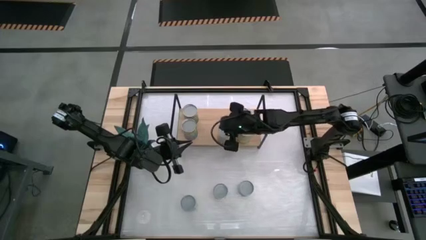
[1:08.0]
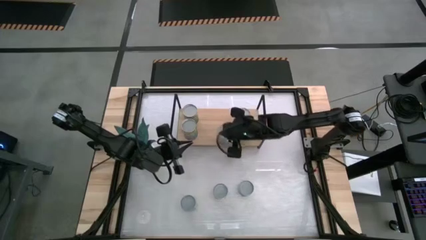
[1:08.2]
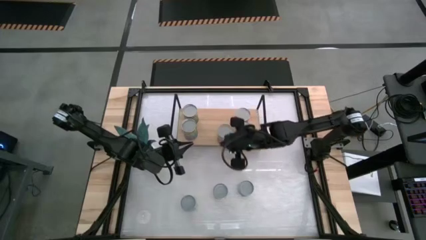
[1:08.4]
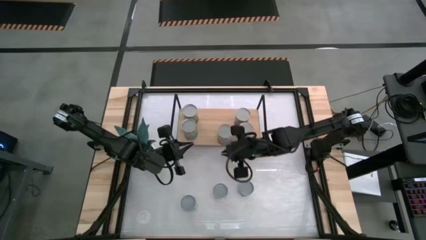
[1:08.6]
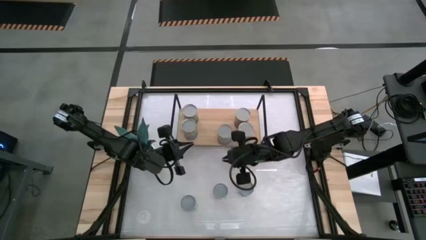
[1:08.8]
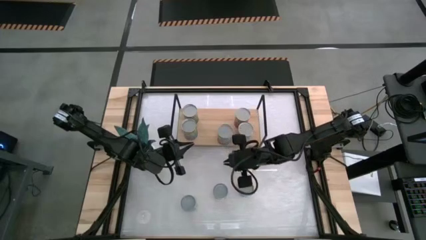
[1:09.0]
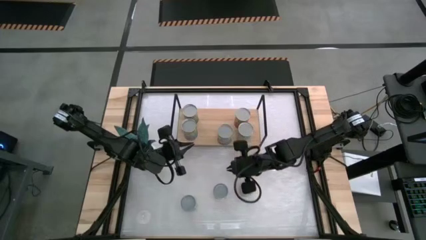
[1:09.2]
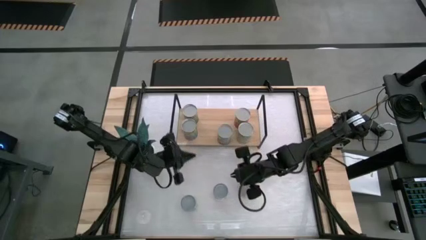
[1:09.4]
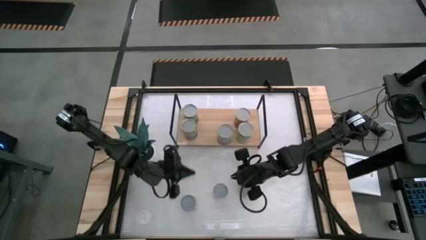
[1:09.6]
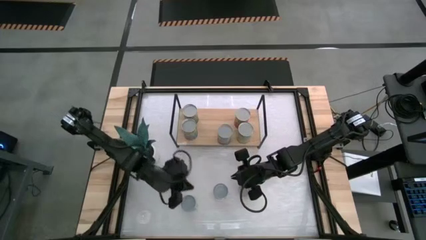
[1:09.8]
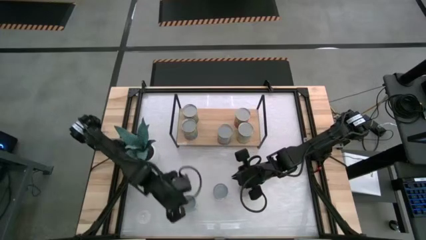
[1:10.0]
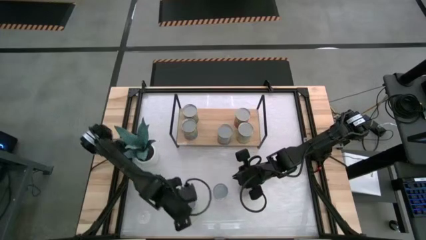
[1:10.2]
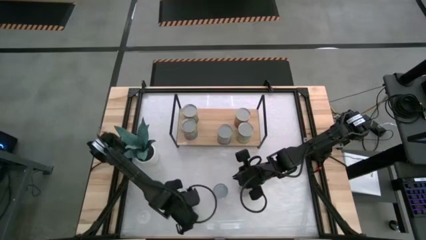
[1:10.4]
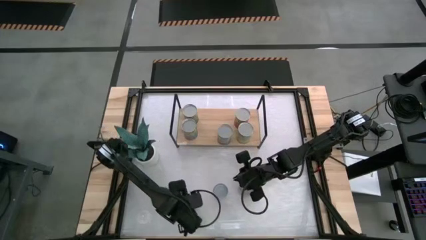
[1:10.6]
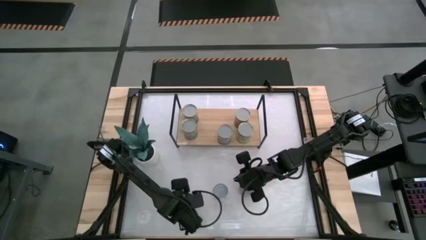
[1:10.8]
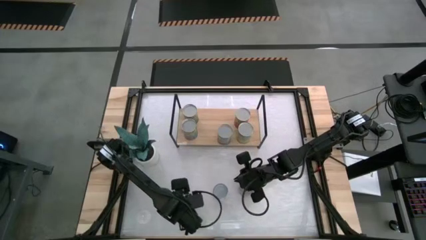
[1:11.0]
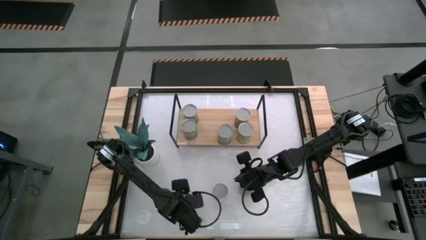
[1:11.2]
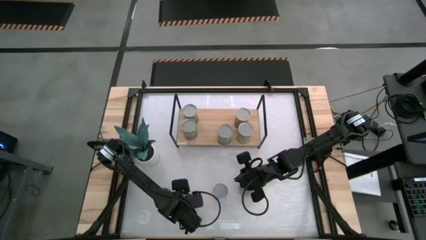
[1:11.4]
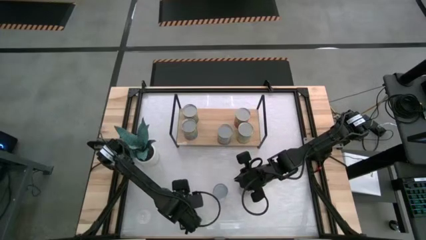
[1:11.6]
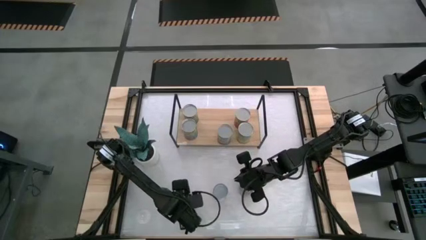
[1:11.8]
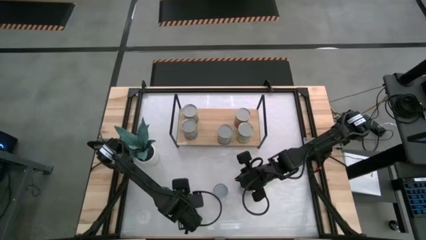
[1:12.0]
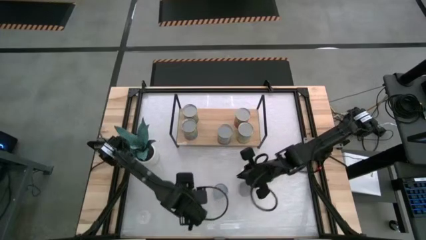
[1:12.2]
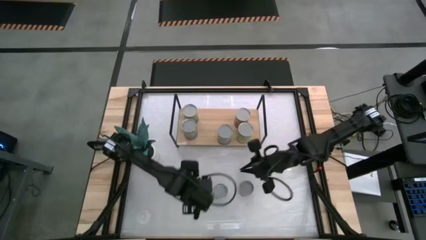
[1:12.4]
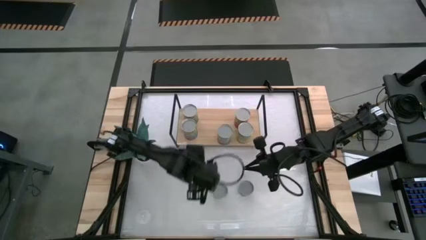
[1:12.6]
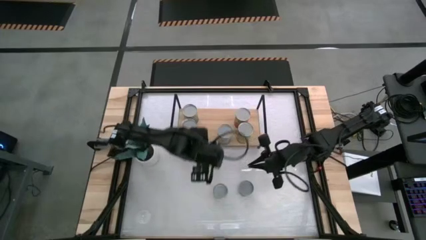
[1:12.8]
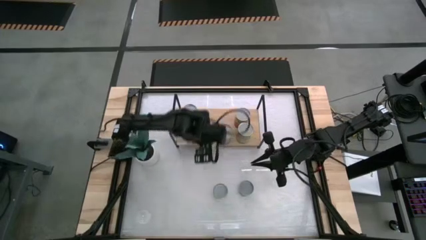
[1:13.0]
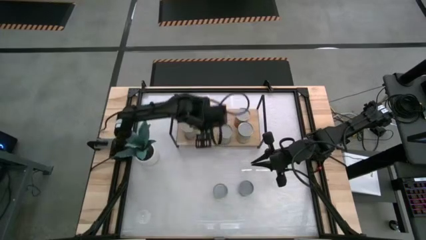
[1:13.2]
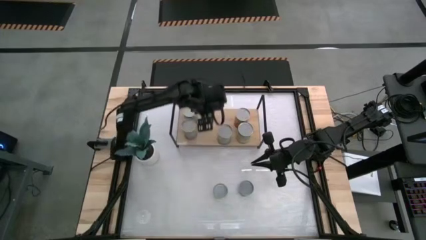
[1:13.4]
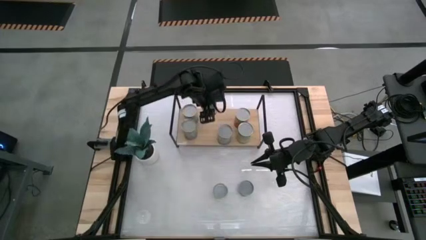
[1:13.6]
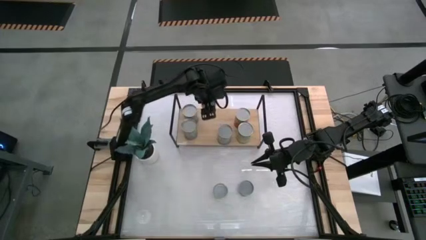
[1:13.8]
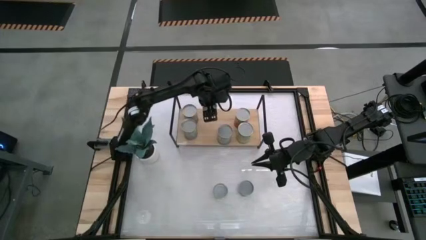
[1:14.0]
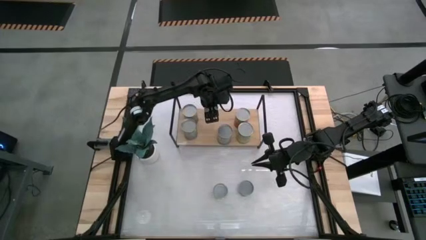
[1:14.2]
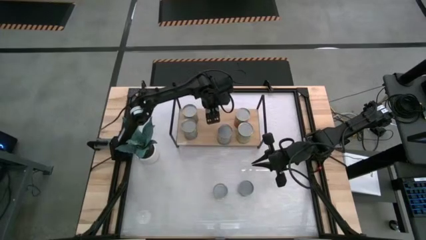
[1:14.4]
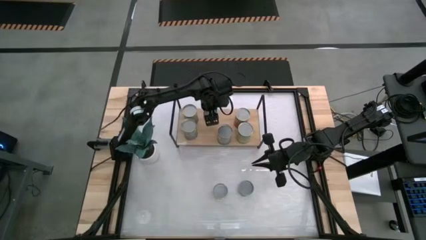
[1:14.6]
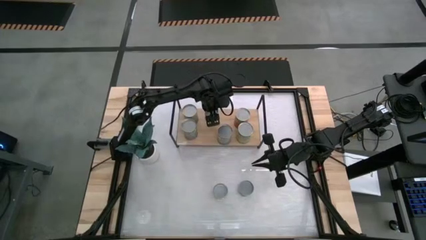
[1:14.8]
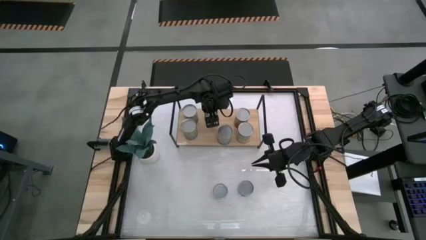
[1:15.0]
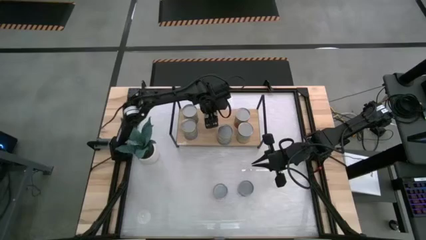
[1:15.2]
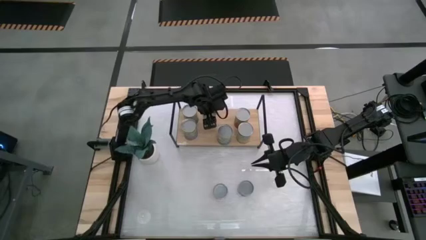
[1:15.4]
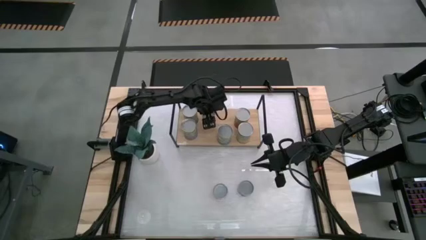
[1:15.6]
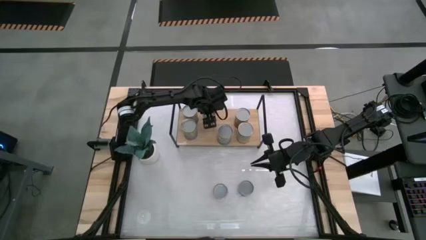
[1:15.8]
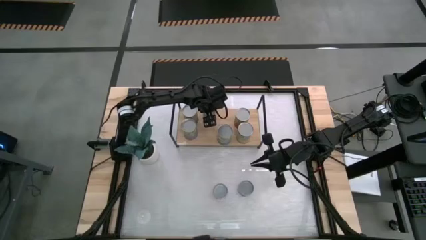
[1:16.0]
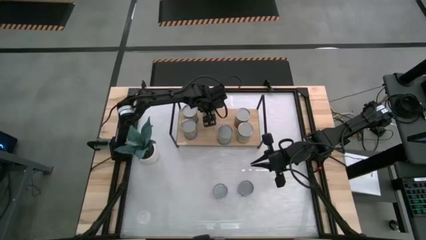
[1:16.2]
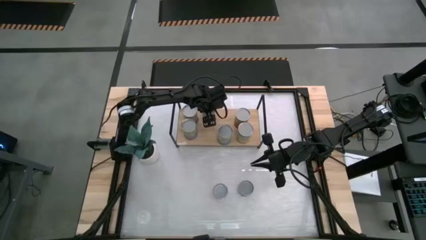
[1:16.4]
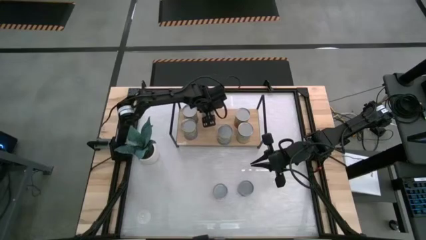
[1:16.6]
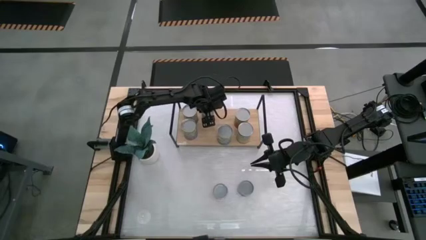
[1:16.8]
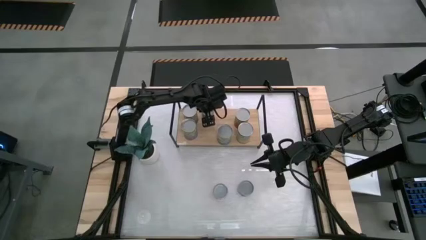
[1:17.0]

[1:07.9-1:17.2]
Task: Pick and place cans onto a shelf
Put the small canned slice peaches on the shelf

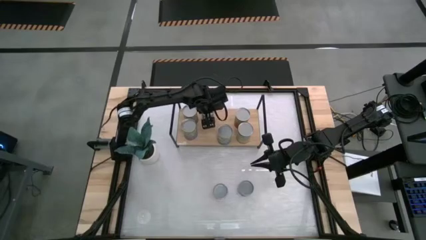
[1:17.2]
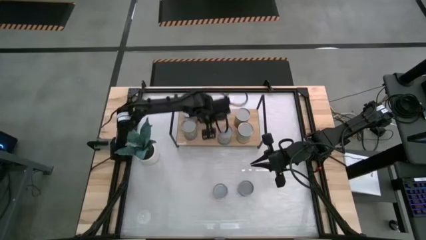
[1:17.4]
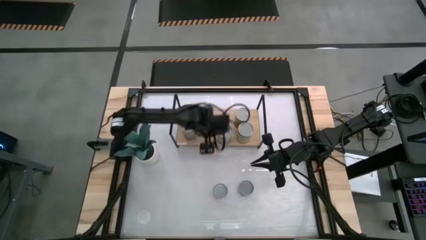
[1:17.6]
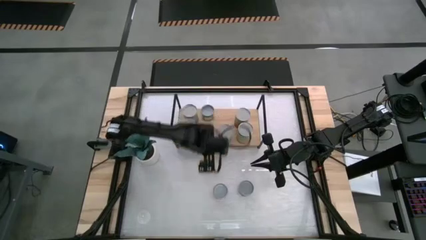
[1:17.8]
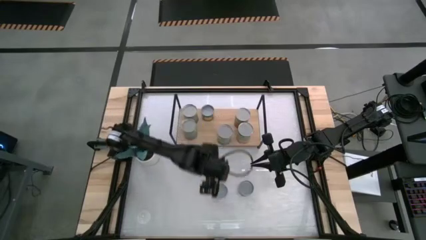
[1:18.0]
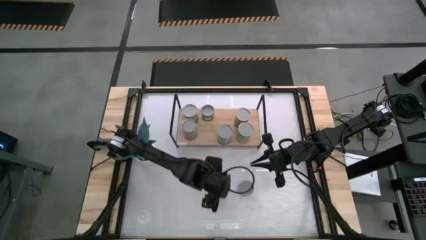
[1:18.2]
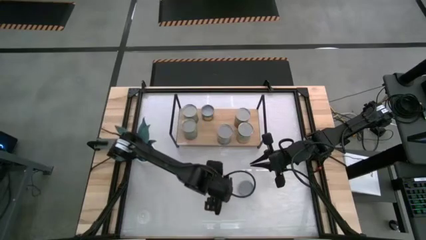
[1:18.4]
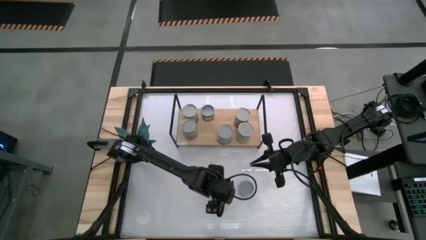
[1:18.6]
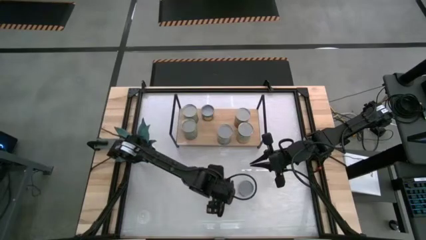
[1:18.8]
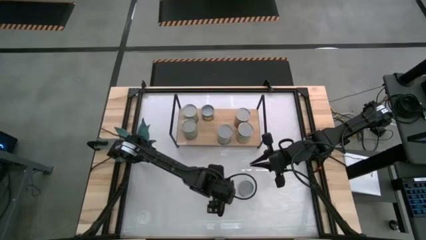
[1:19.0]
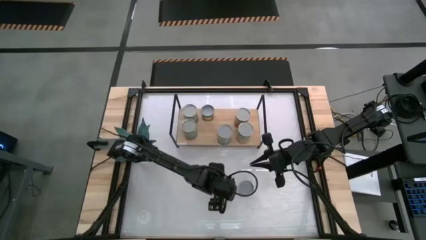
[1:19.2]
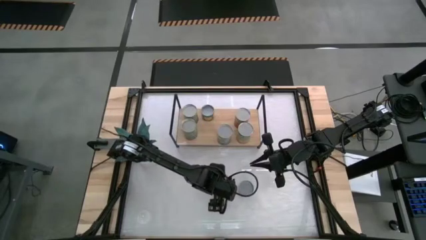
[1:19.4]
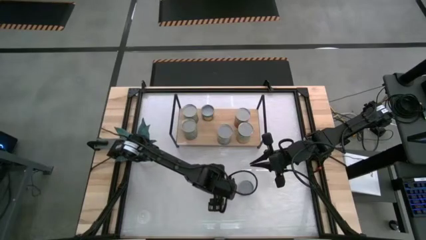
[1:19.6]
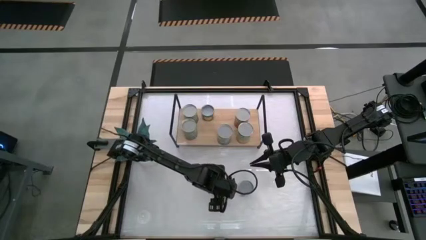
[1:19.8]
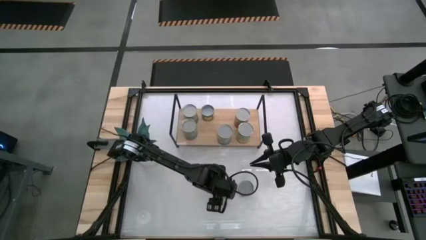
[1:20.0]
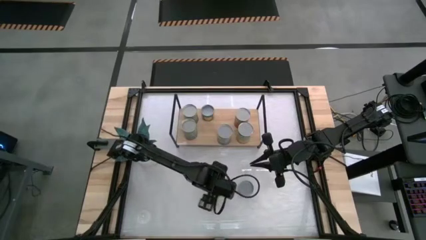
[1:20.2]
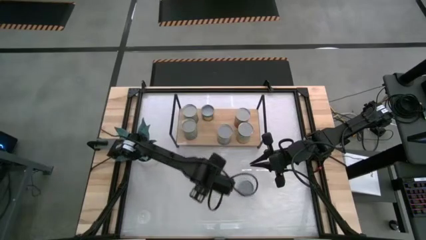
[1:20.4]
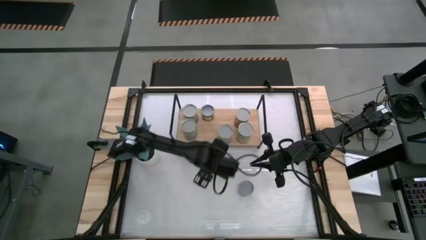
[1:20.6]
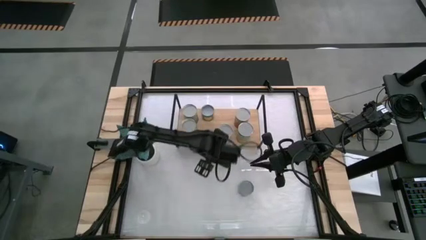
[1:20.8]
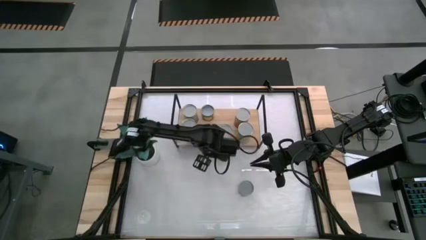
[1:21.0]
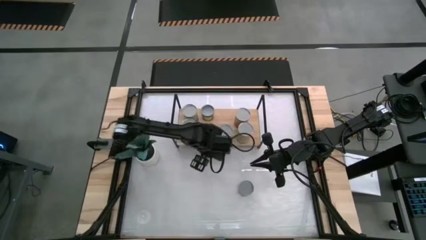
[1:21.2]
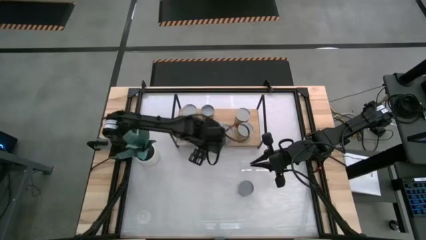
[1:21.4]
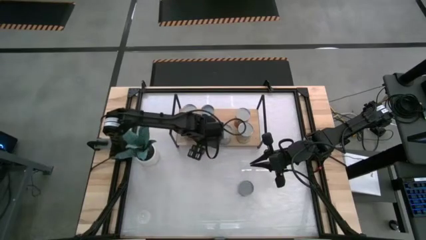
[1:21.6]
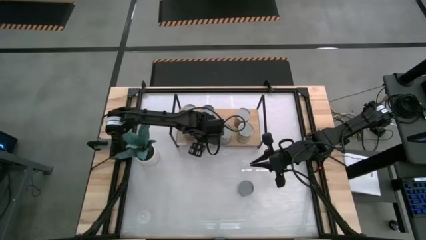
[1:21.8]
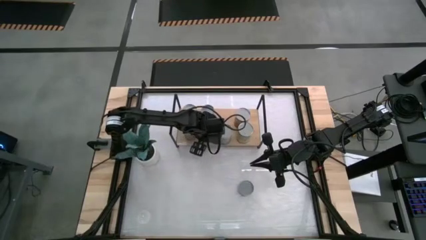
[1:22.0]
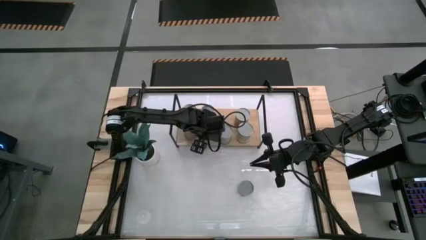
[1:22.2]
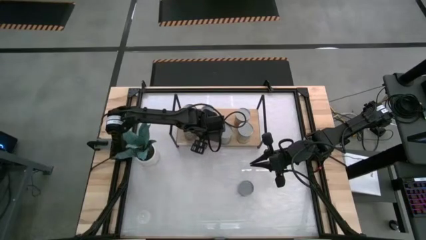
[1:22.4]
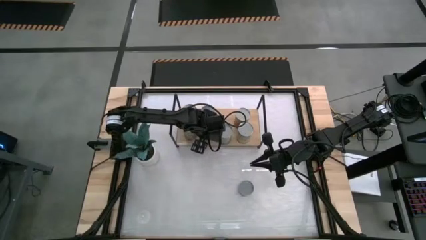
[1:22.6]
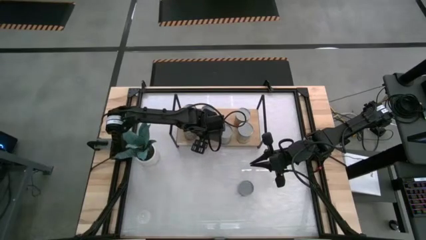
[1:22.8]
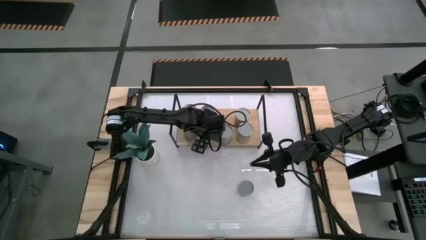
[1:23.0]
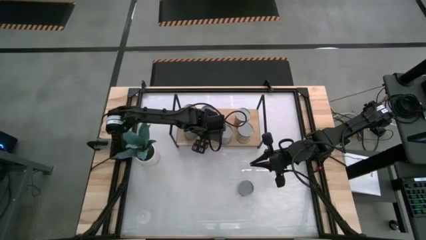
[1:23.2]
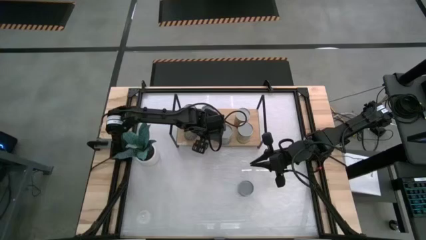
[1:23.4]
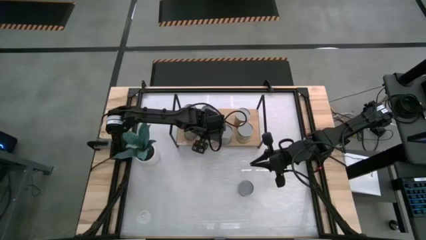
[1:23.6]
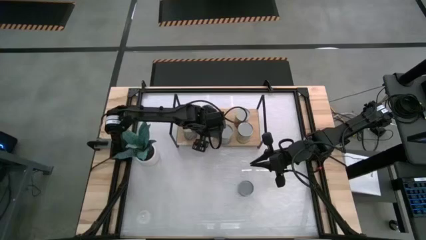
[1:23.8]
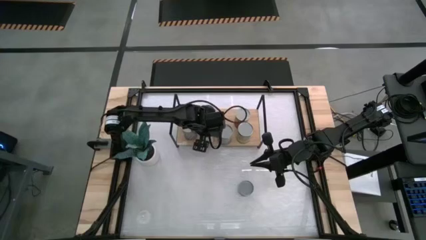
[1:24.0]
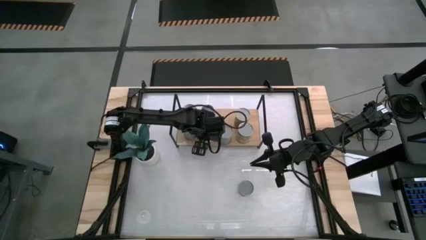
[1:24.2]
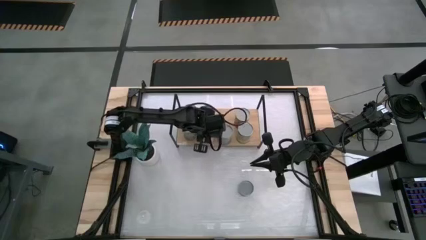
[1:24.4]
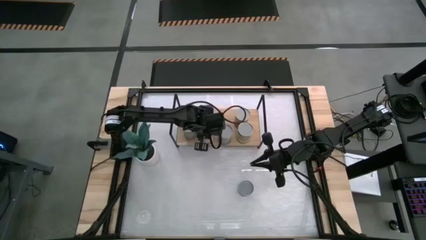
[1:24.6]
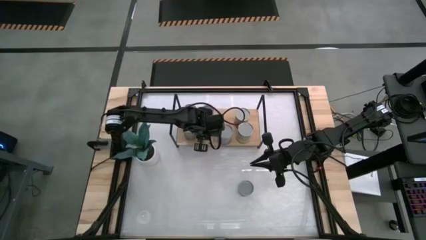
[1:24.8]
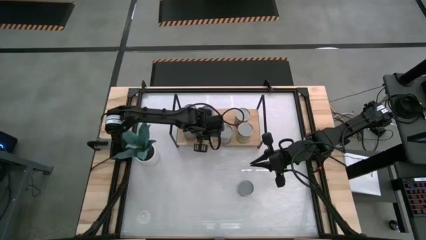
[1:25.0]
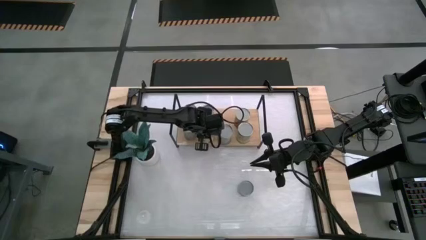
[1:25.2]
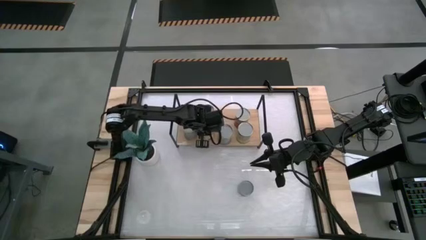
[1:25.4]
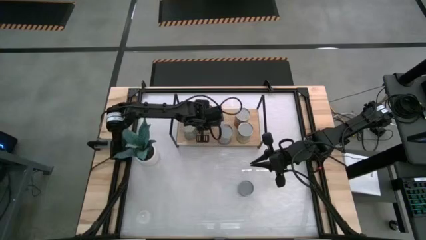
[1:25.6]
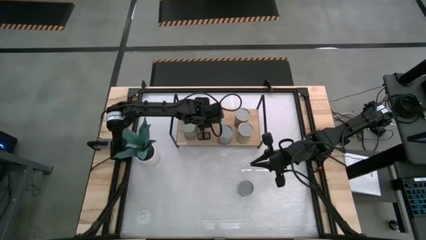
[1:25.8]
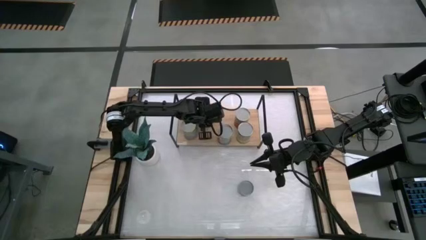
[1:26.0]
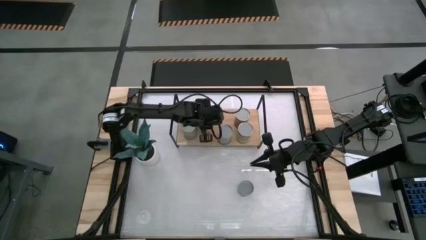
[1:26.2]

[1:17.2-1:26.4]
Put the small canned meatballs on the shelf
